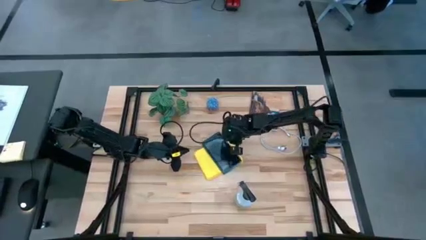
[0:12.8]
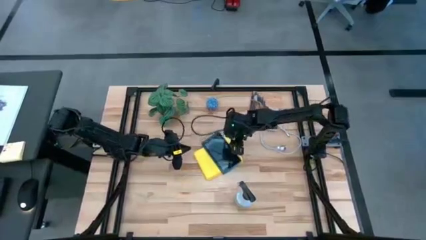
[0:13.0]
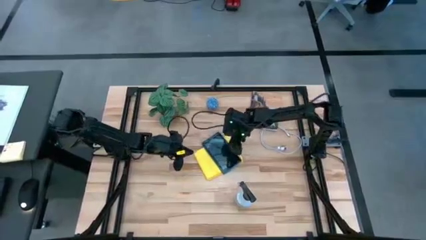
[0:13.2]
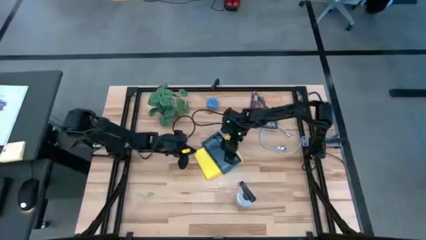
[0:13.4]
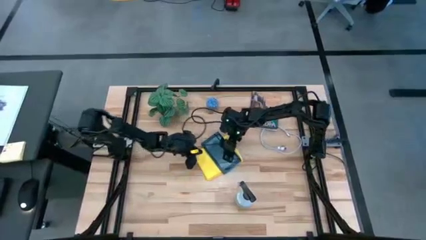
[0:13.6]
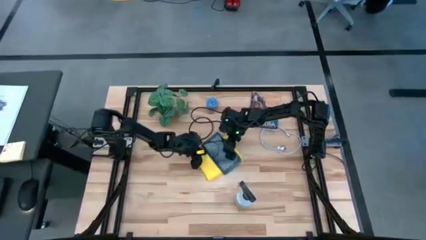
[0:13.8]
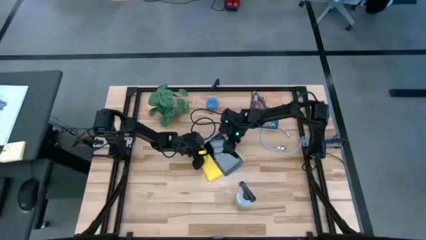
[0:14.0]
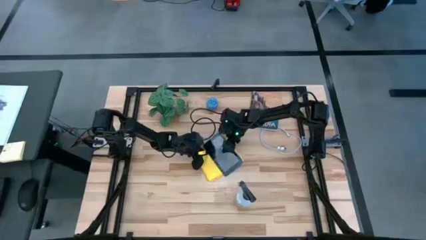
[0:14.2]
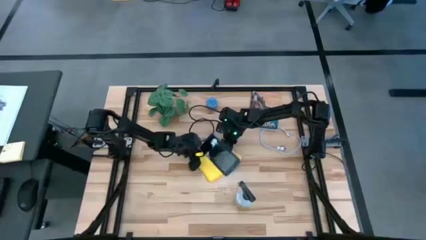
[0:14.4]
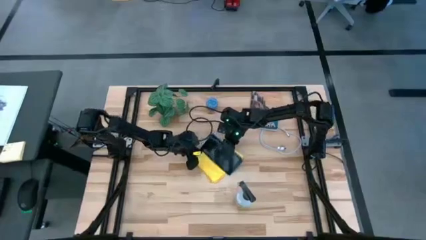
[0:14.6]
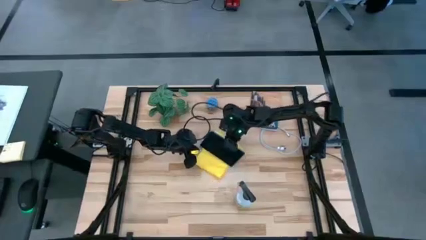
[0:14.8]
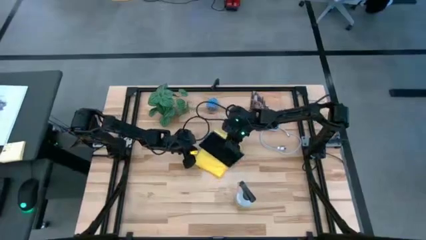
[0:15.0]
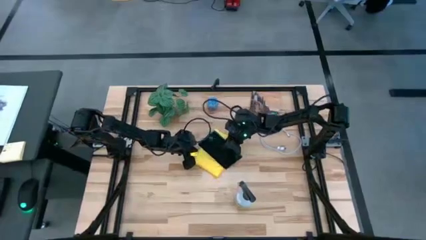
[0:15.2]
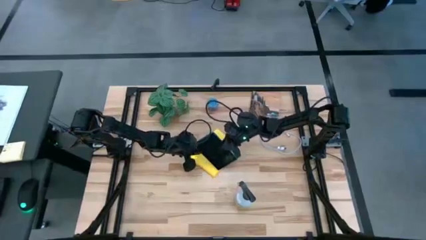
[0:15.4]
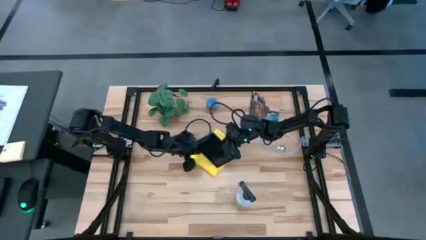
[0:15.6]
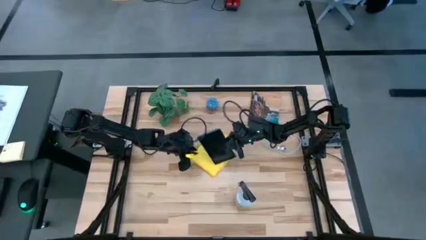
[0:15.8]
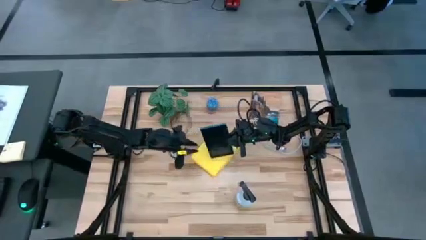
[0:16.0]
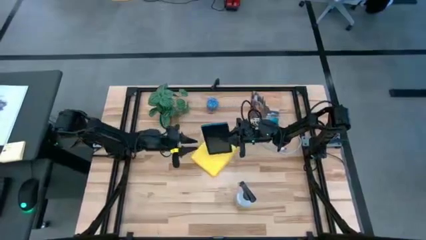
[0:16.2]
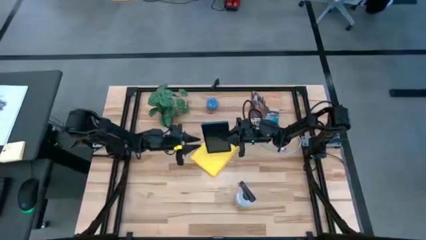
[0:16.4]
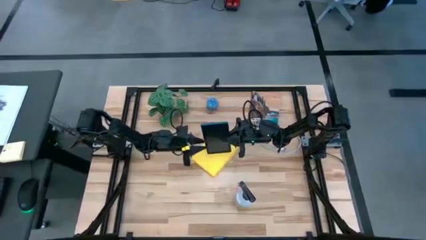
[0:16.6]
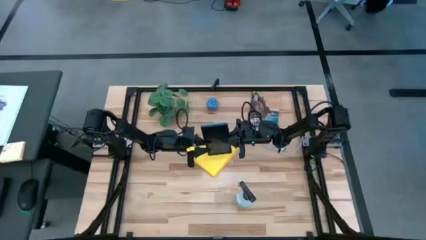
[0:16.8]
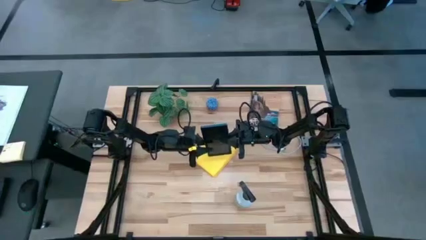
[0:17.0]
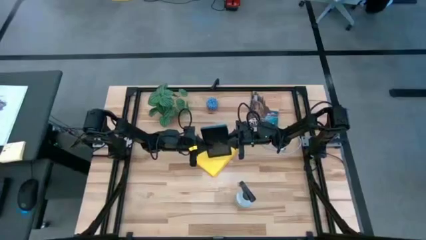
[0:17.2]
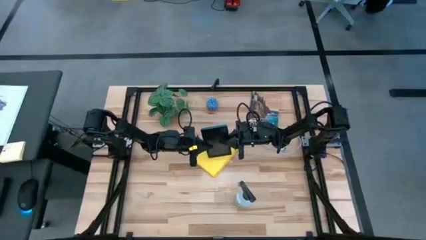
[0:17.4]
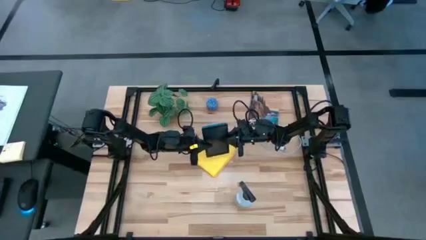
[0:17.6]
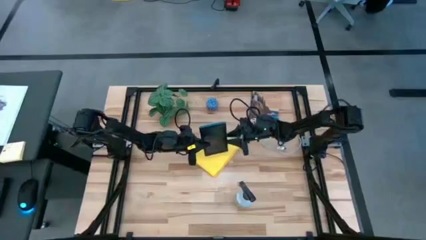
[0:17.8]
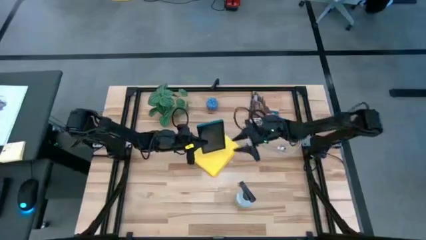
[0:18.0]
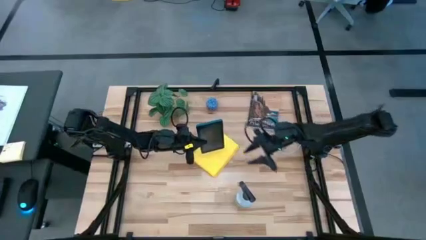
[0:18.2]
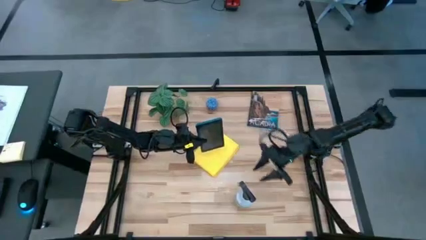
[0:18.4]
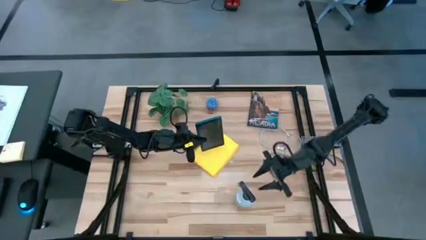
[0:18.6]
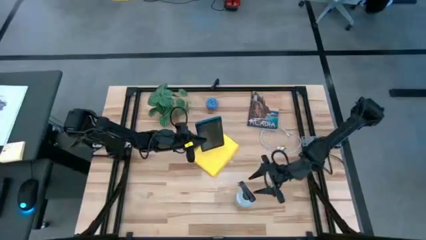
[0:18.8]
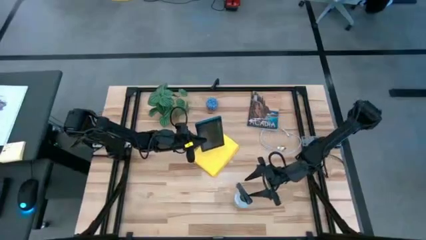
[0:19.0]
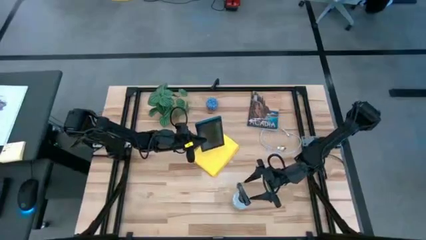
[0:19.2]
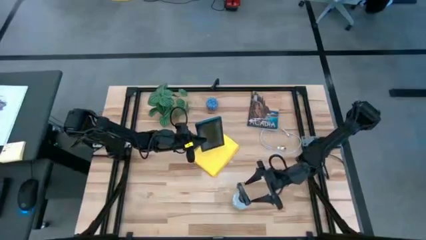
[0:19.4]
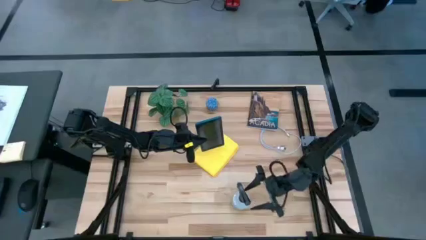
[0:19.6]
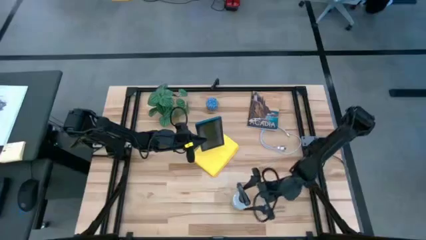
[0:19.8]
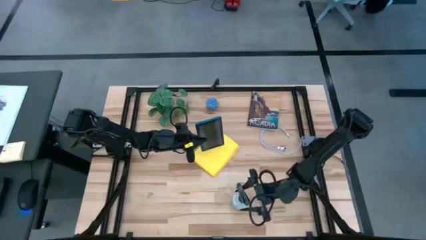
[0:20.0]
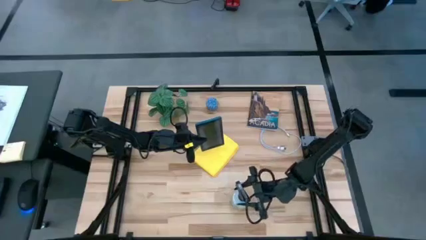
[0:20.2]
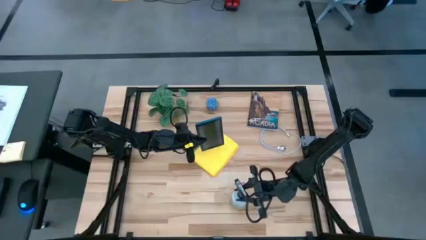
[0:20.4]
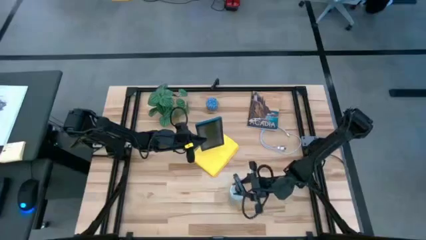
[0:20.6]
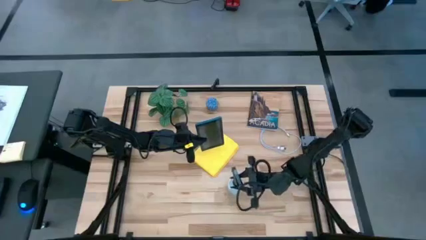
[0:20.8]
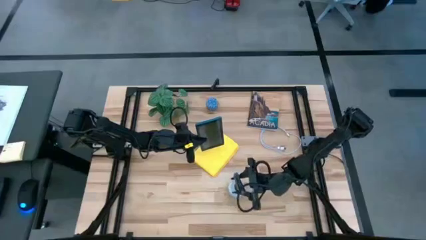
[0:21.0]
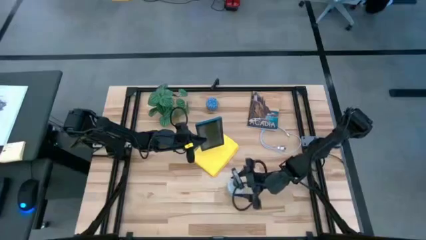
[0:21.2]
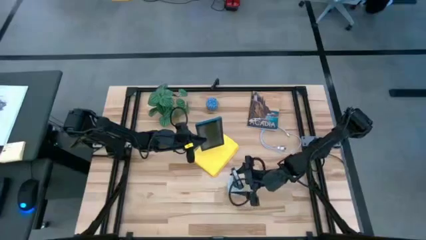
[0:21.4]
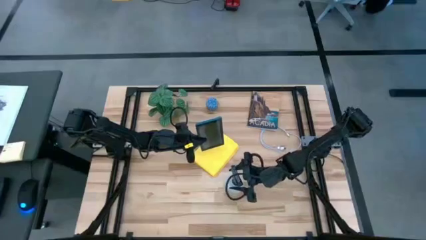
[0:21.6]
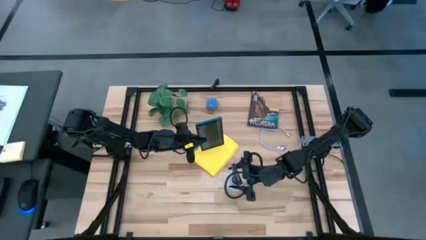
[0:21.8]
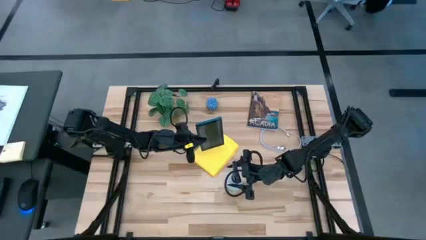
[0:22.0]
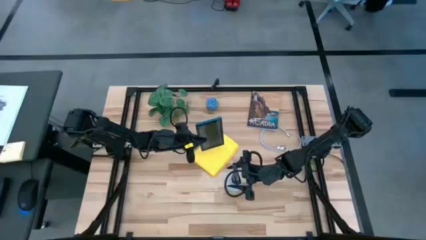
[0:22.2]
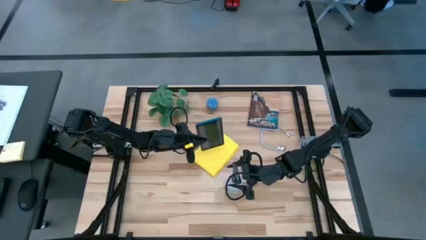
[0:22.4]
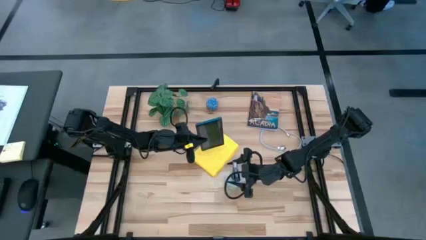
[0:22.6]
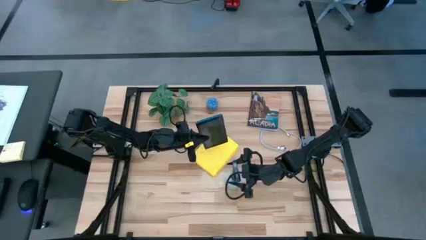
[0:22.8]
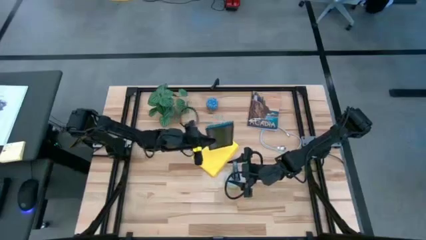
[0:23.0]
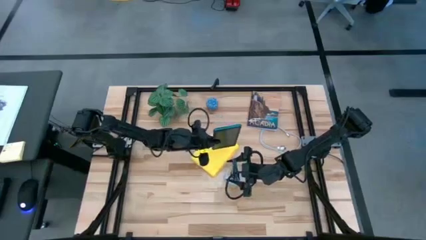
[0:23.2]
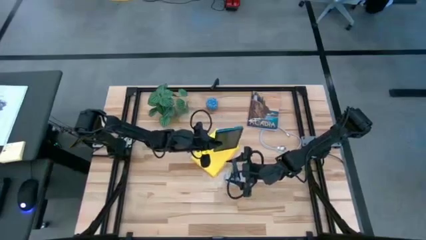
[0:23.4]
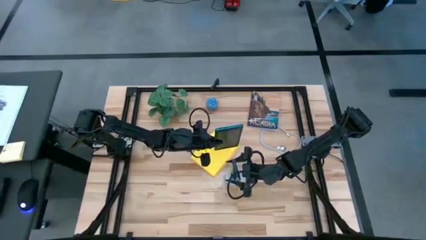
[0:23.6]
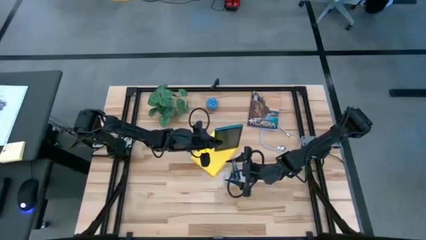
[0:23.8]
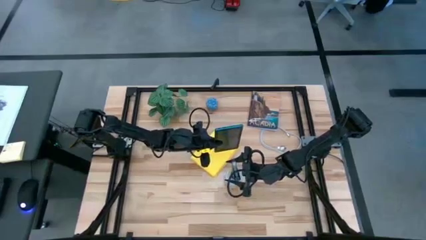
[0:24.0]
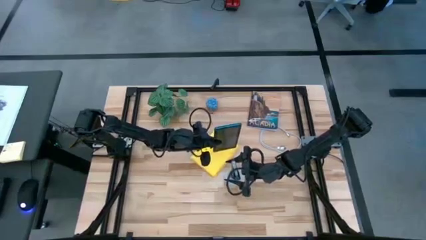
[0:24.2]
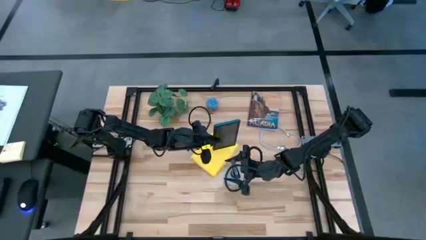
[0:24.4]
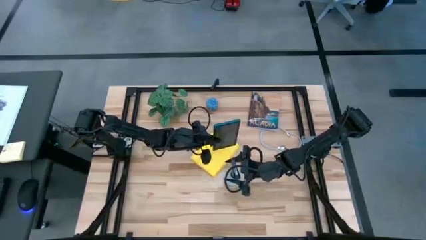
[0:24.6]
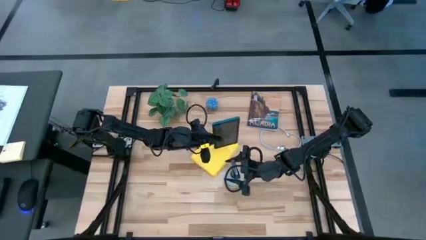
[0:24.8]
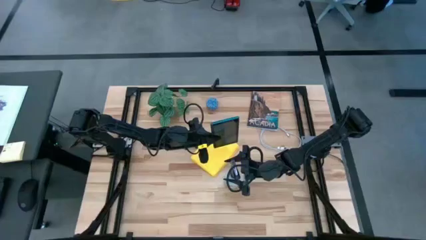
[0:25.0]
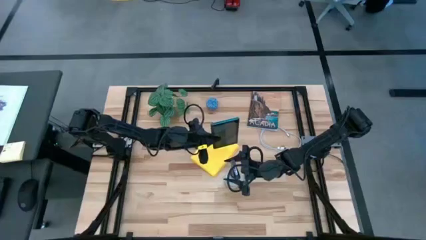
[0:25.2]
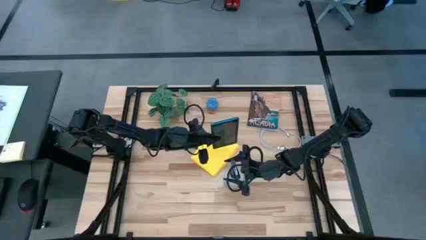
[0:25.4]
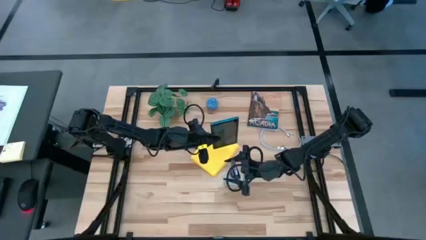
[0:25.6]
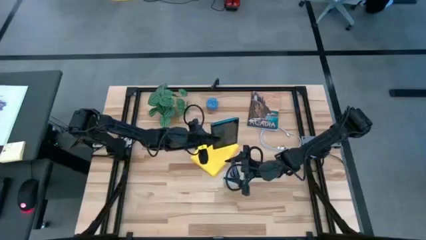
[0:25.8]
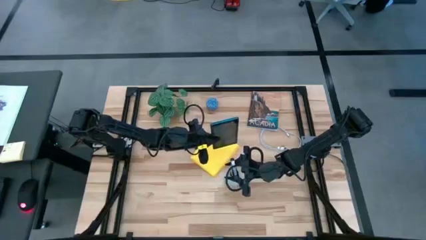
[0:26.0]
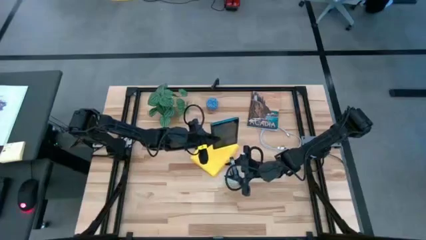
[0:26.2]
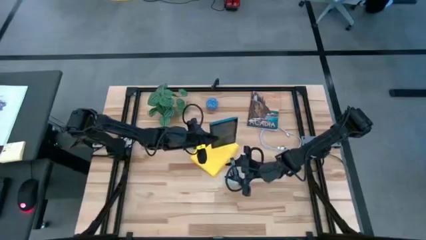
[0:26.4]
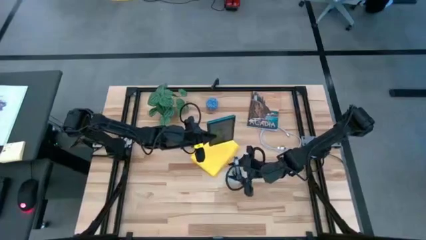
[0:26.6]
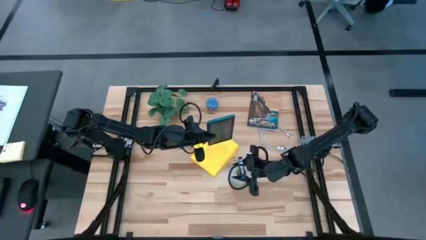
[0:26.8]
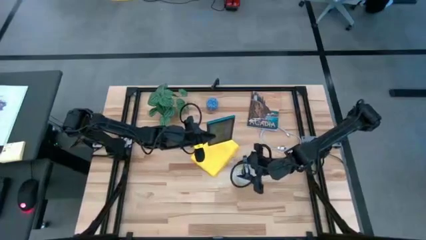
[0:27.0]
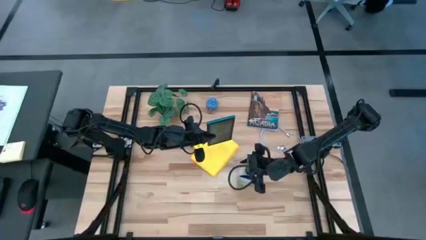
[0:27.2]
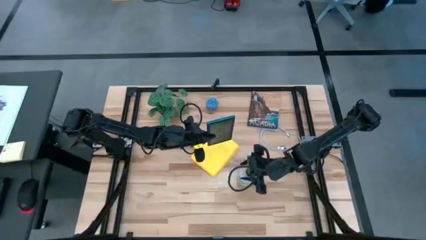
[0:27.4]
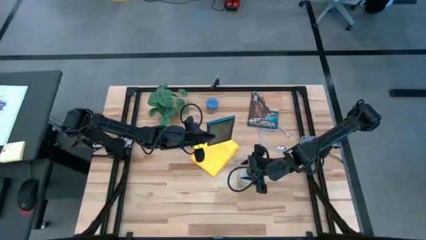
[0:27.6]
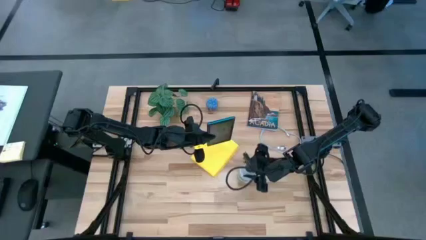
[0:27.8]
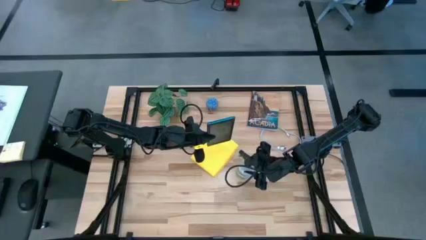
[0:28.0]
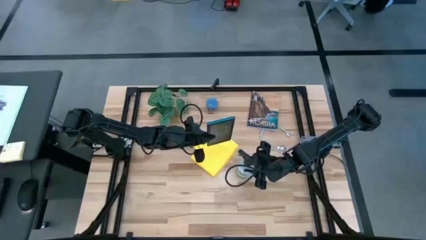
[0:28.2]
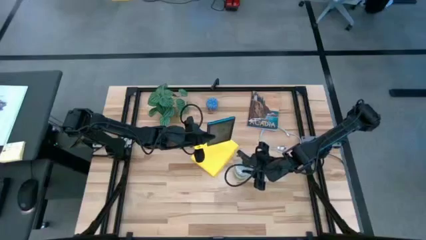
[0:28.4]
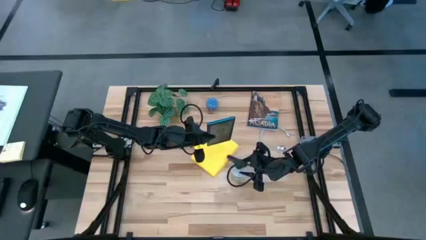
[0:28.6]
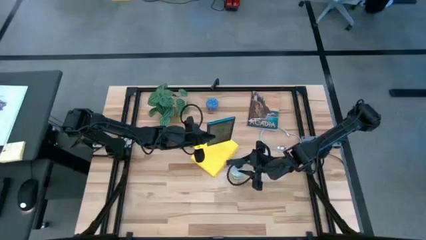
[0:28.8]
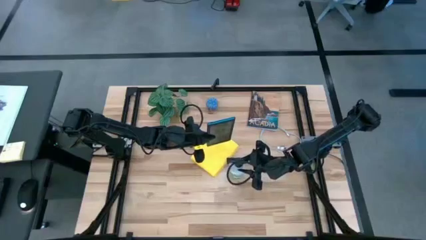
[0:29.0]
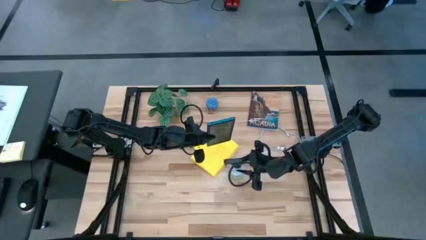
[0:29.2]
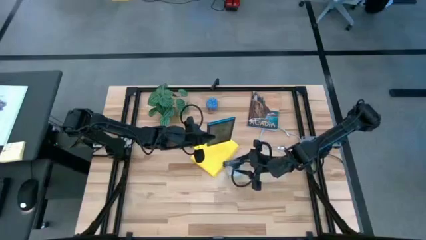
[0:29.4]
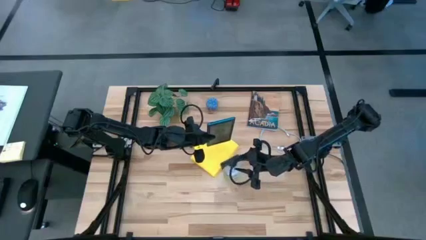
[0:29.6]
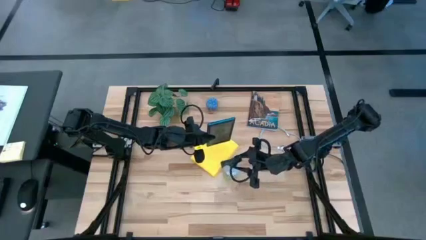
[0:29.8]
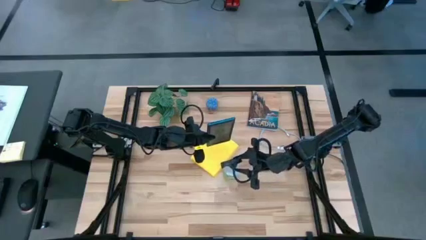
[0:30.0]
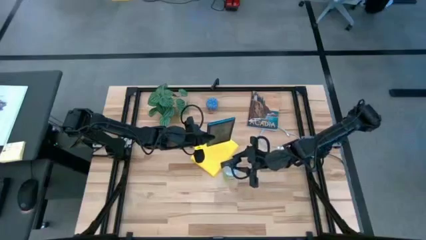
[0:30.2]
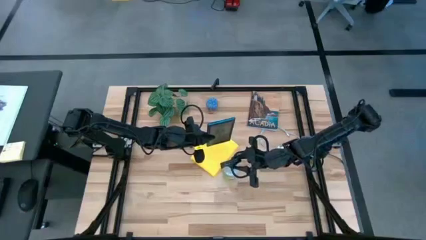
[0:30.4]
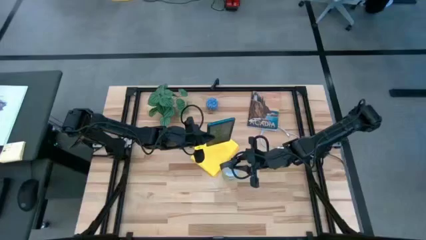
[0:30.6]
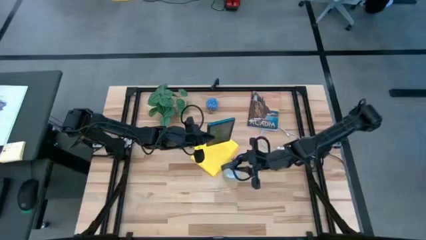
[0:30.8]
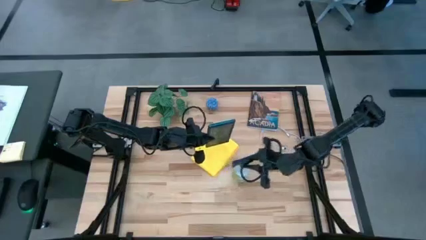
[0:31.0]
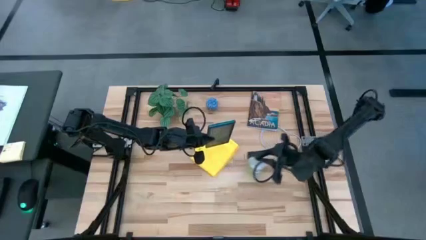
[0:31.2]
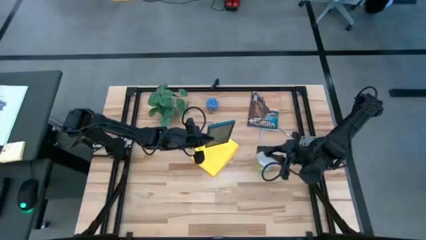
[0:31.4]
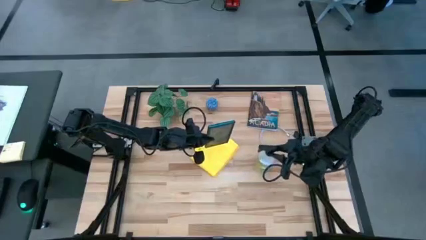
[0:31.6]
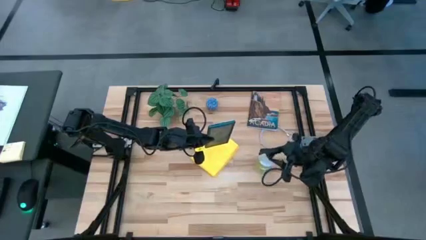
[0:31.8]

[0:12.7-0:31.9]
Task: Apply microfiber cloth
Spray the front of the blue tablet using the white spray bottle
